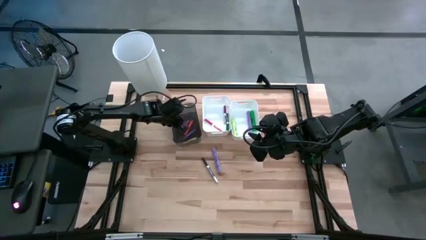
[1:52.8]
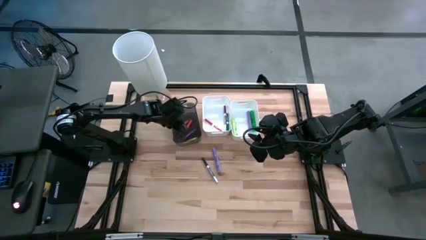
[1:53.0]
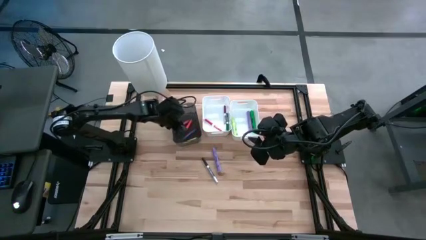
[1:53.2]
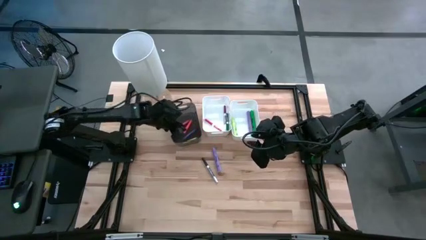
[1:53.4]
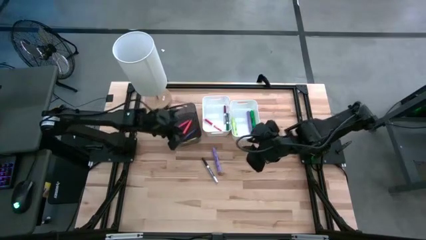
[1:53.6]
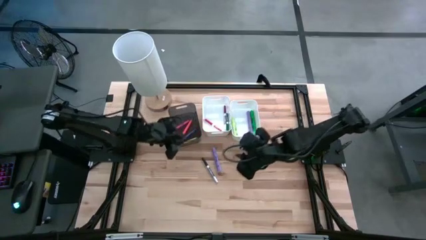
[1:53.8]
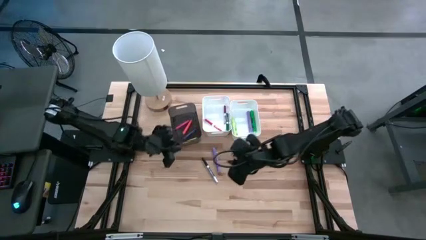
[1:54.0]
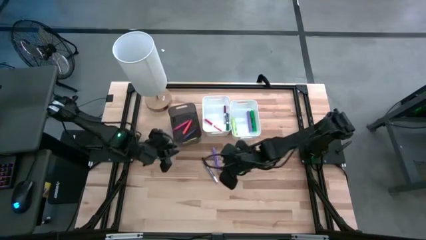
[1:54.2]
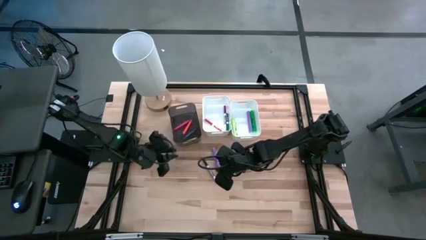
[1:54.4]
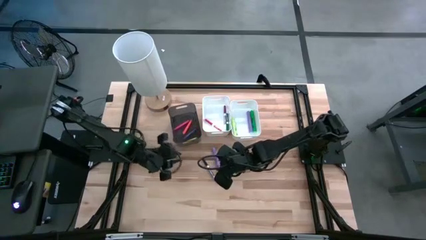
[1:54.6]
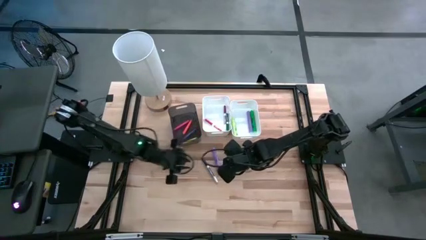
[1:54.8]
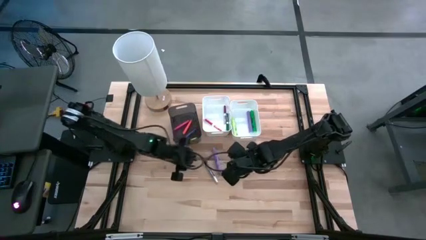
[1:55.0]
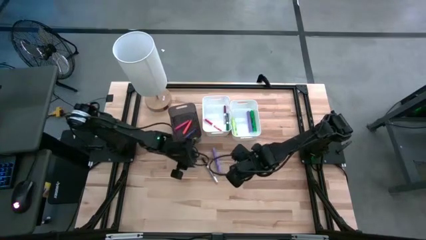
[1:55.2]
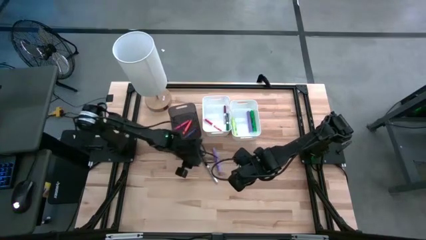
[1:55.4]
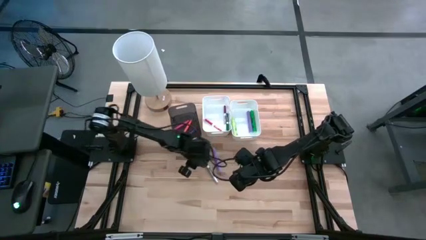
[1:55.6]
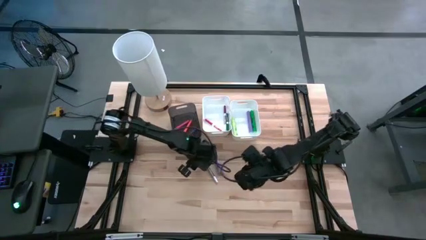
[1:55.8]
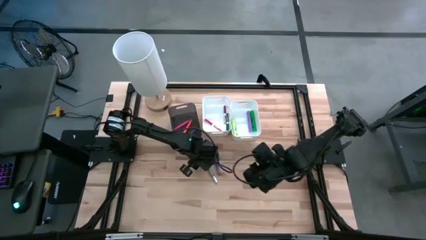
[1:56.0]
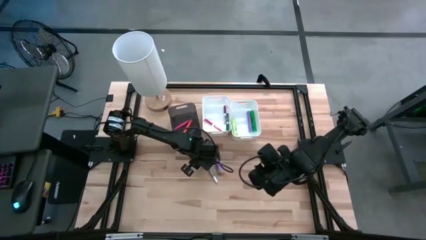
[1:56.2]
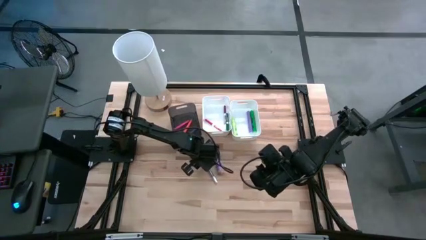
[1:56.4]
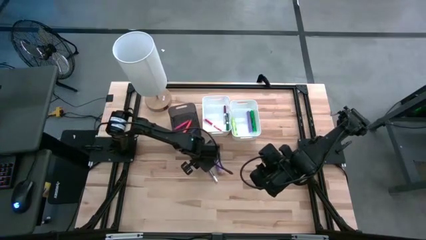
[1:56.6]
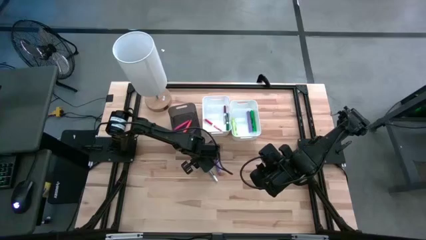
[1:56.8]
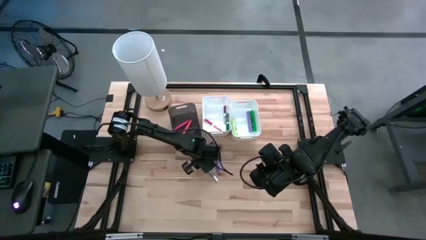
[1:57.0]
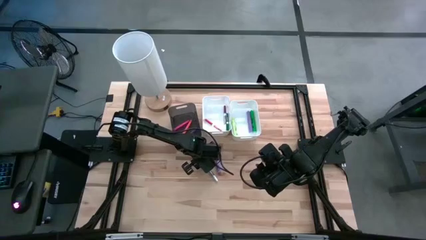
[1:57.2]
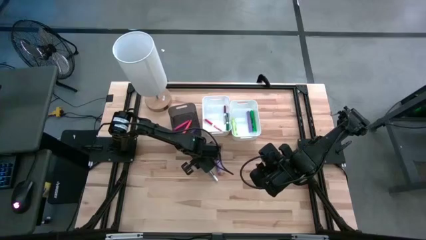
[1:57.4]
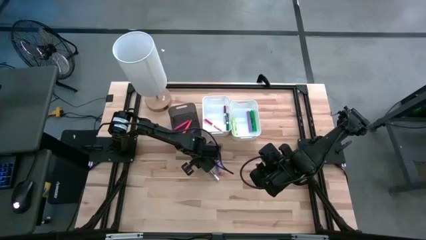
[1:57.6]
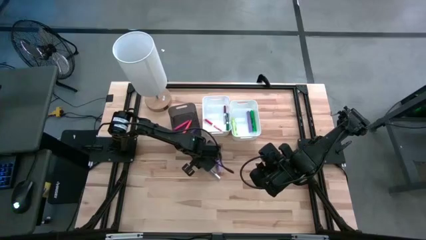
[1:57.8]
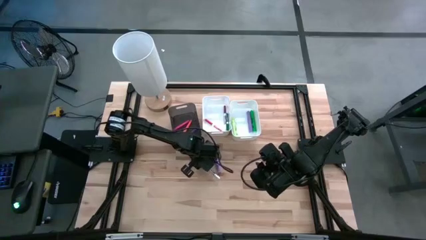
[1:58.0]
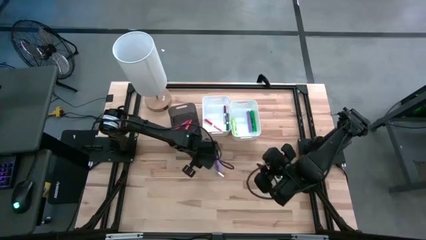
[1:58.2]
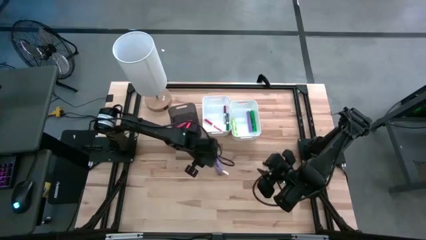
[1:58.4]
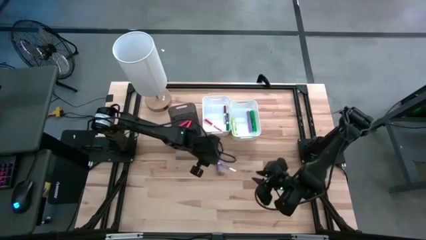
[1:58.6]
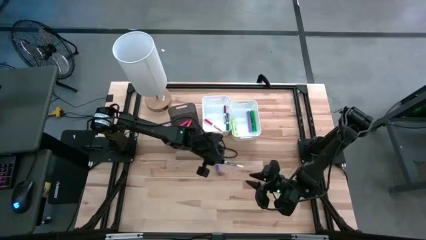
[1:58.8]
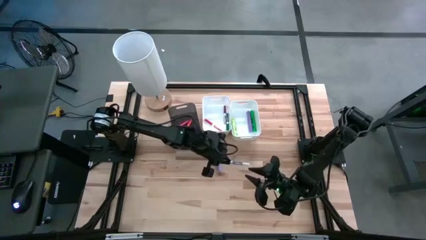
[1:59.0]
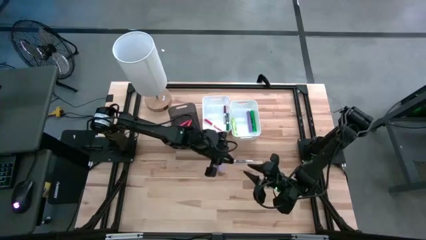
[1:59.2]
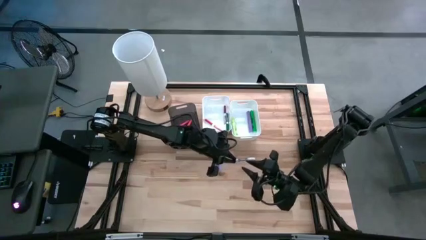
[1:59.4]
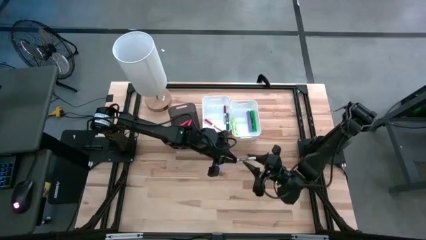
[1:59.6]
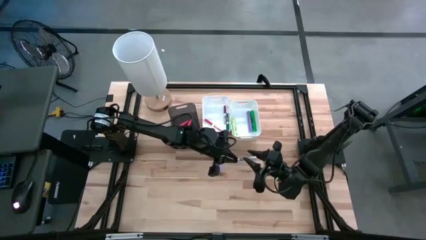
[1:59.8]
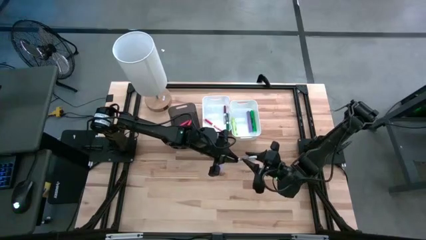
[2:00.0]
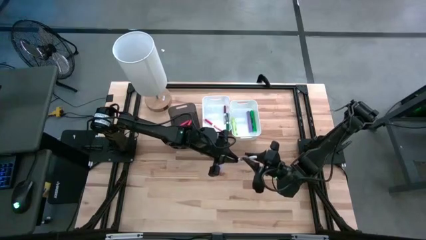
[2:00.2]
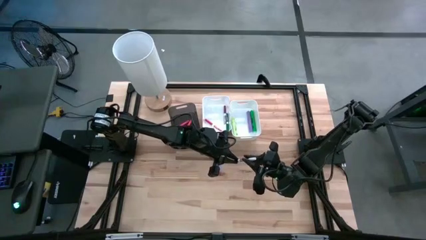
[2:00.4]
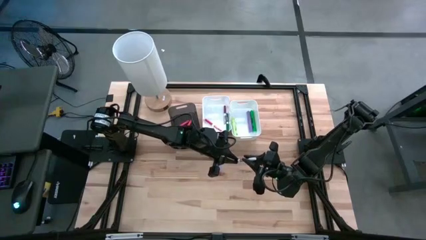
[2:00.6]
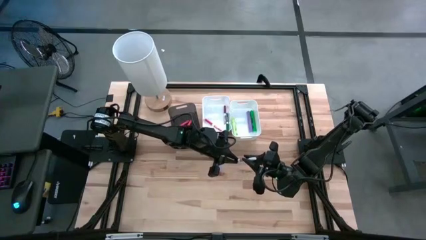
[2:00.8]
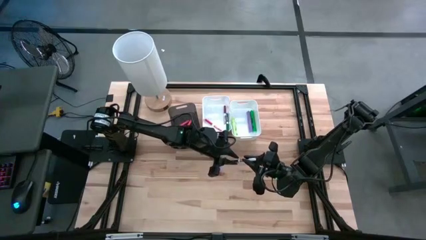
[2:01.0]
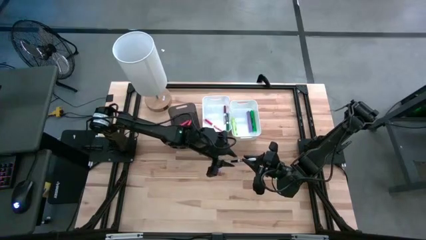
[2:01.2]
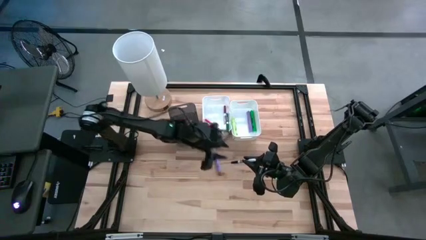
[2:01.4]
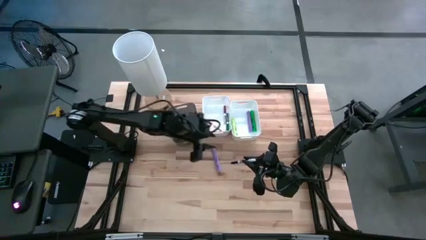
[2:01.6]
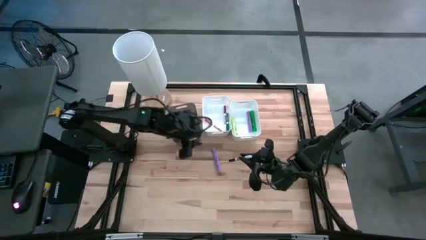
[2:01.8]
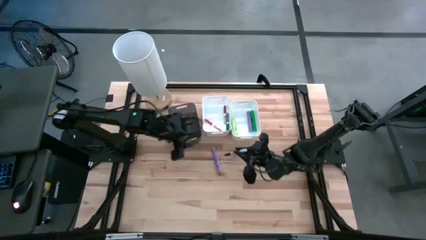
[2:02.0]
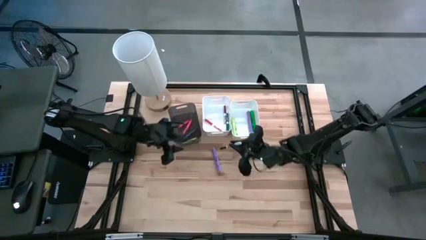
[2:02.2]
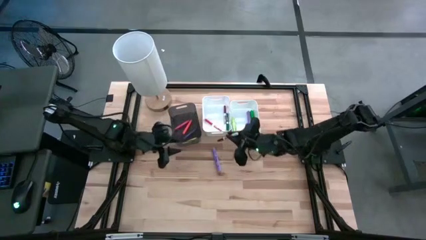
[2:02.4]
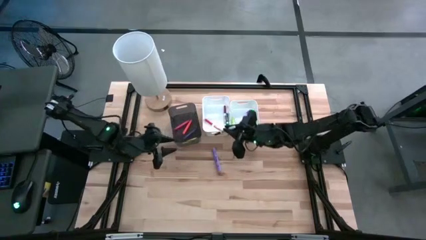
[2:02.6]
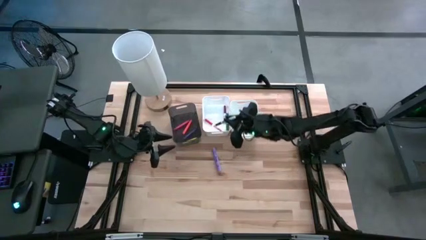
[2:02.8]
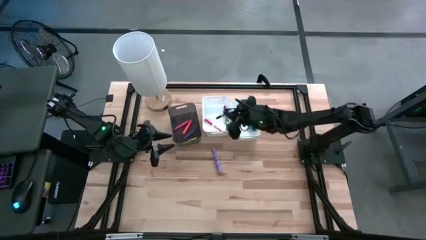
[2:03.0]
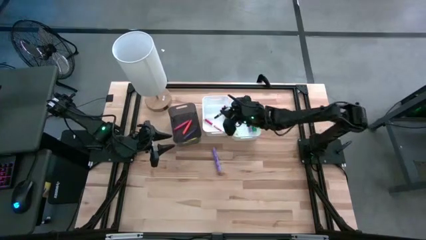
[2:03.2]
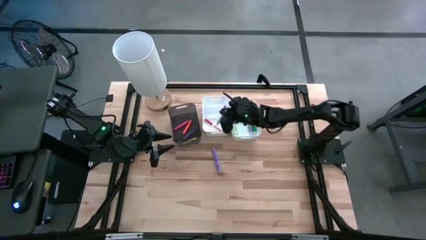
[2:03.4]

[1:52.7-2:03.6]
Task: Pick & Place Markers
Put the black marker pen into the left white bin

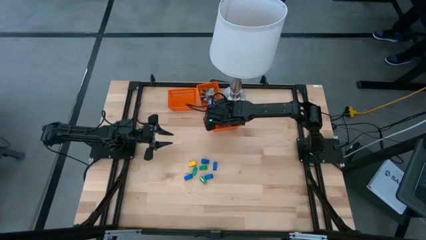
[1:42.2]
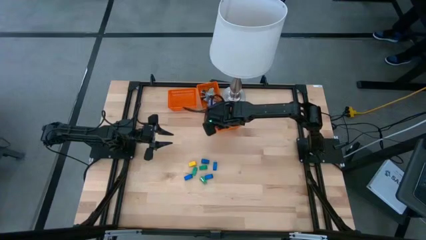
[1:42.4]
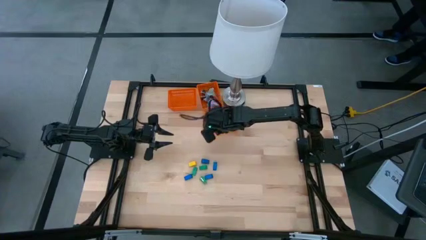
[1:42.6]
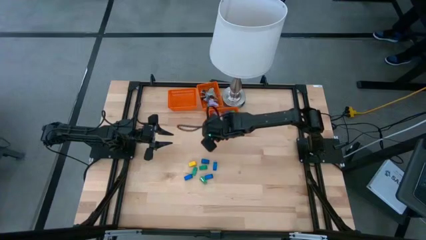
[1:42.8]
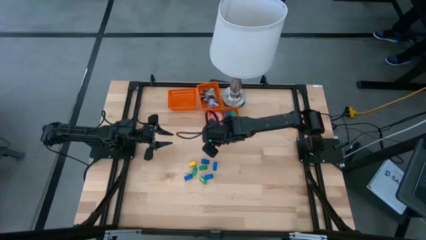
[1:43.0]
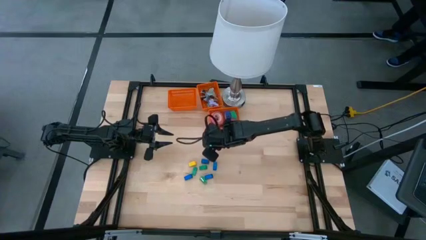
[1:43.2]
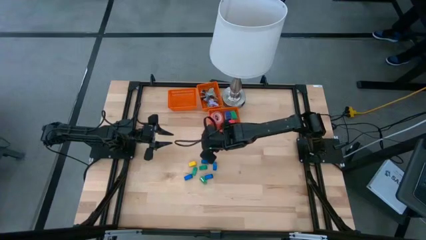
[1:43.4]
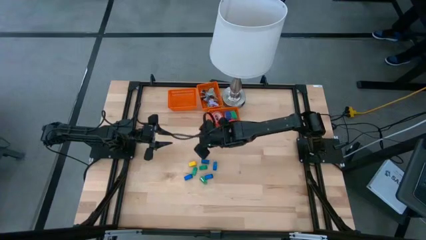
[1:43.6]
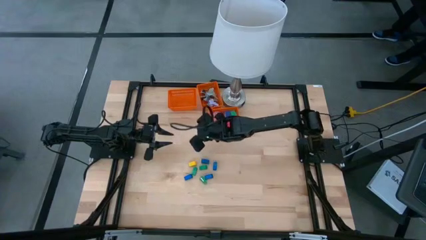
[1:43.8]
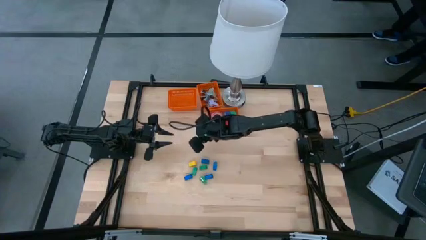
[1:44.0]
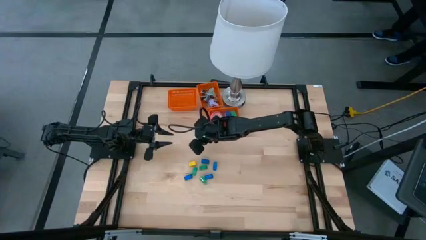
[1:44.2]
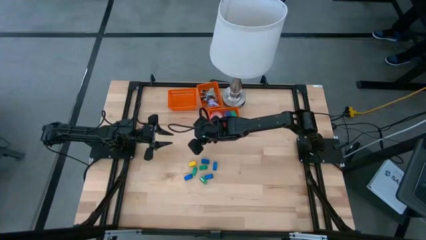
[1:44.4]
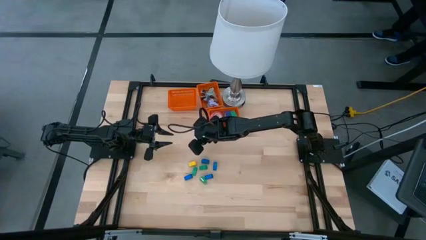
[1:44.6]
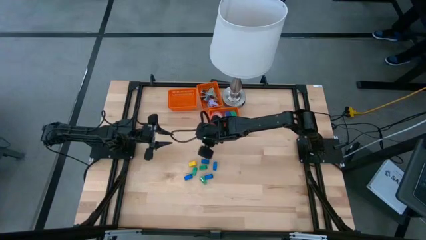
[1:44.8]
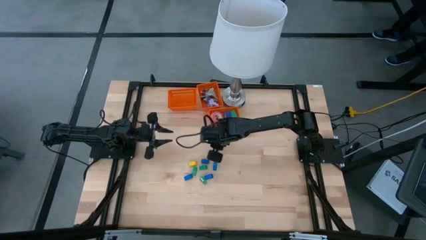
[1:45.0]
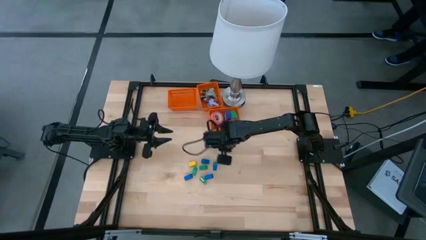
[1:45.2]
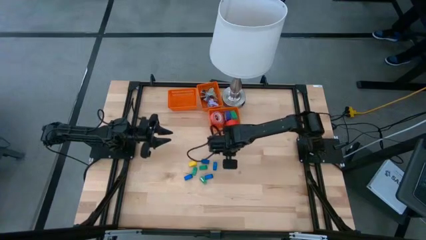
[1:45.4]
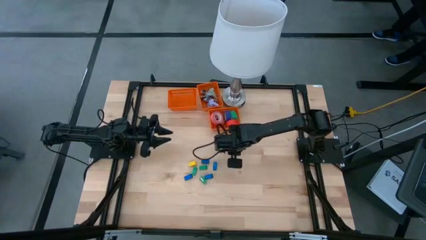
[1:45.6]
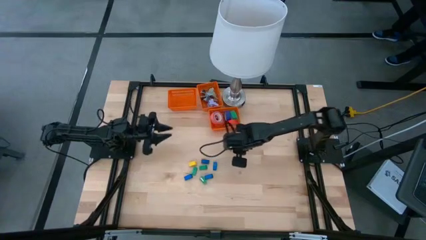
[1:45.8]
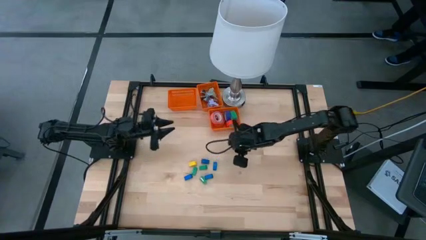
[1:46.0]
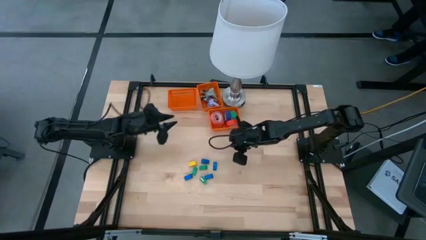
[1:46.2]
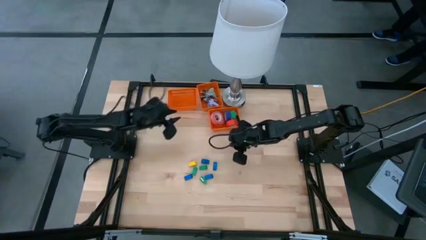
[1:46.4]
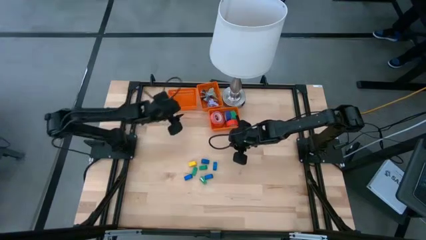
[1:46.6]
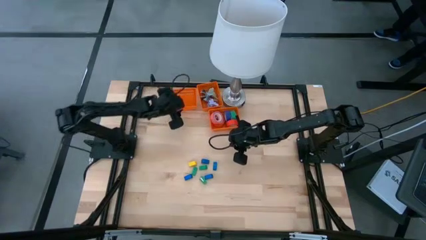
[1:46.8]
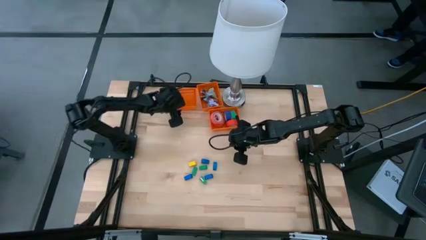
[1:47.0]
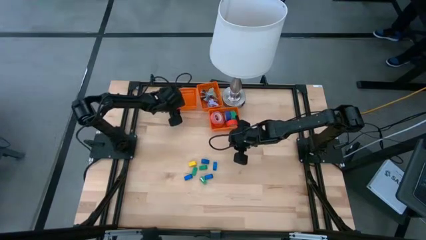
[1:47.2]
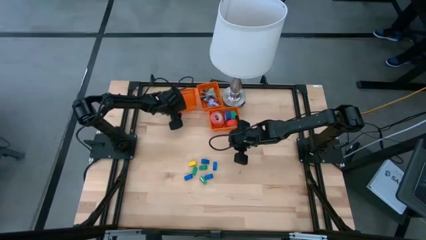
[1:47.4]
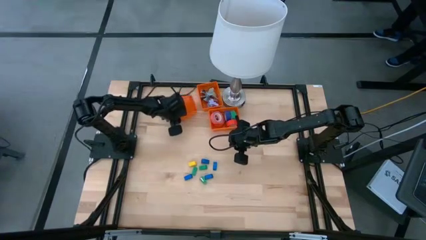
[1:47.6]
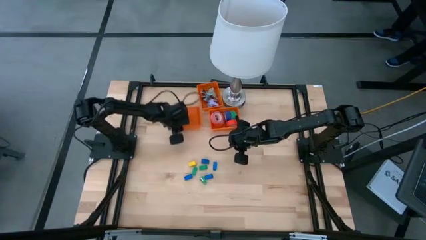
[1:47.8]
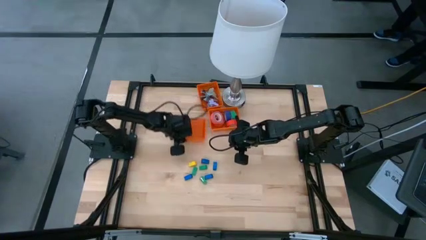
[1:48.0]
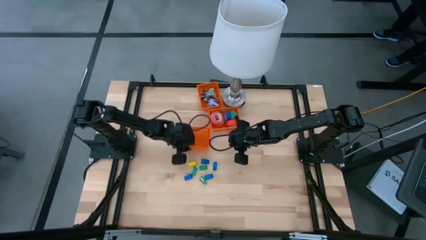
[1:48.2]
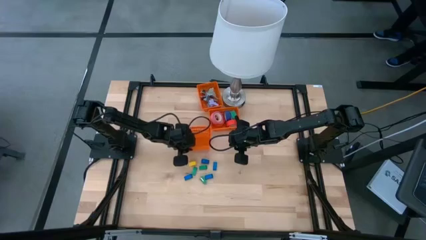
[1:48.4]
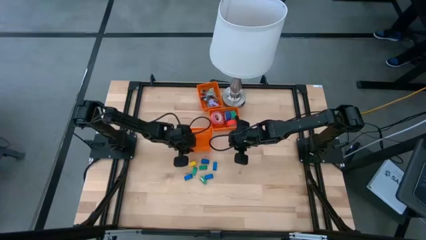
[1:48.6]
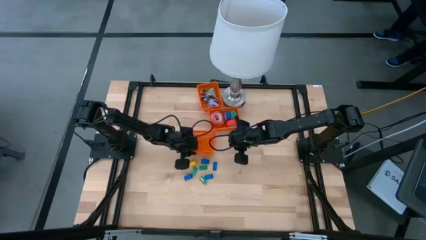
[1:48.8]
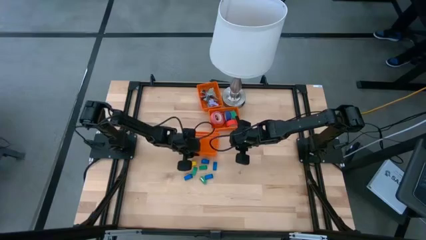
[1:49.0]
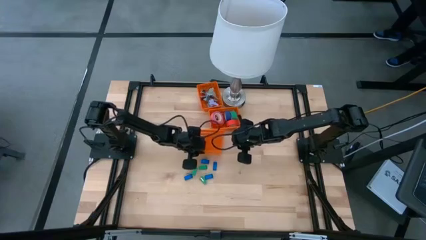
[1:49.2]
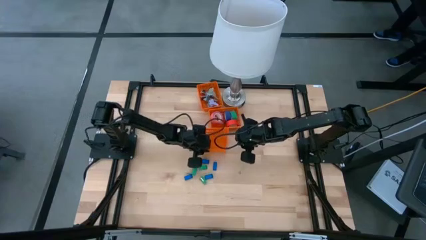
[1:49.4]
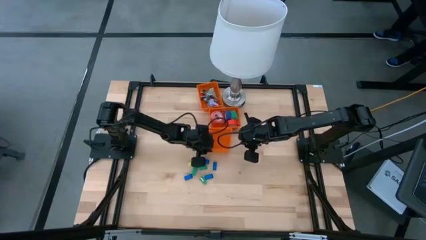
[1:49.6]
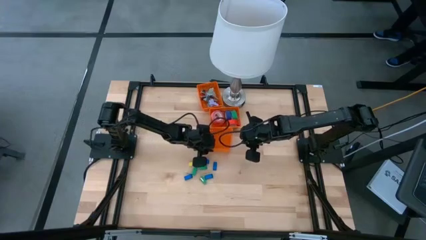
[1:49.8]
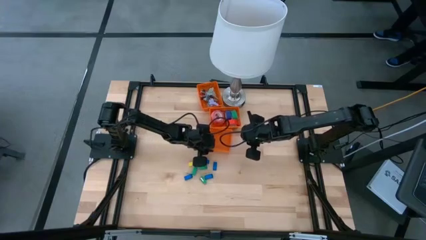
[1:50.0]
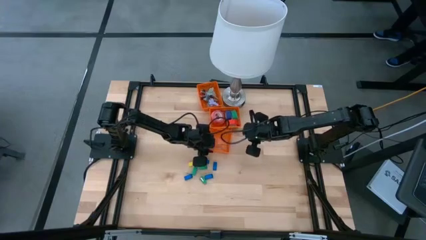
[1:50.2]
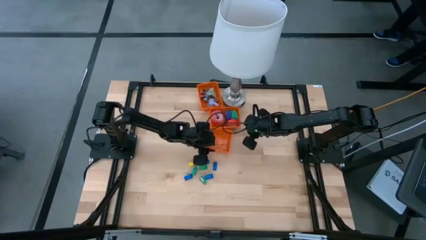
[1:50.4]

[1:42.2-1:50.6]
Task: Pick and place Stapler, Stapler remover, tape
Move the left orange basket to the middle of the table
